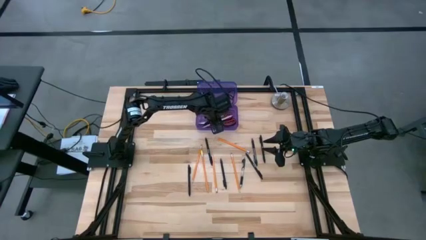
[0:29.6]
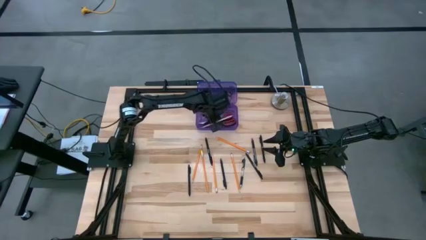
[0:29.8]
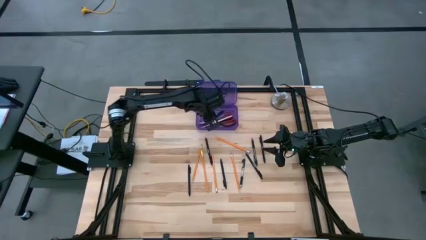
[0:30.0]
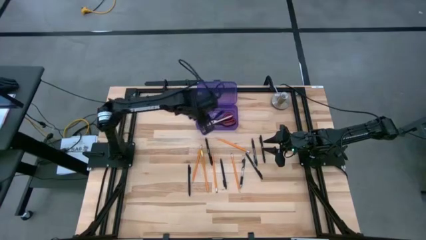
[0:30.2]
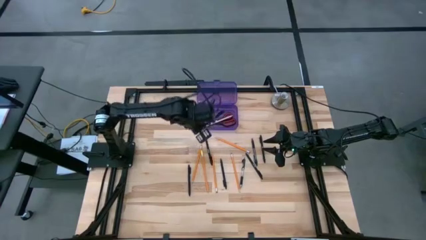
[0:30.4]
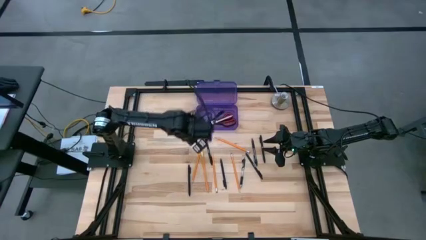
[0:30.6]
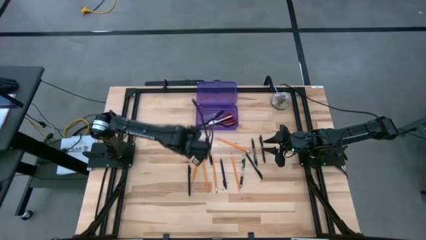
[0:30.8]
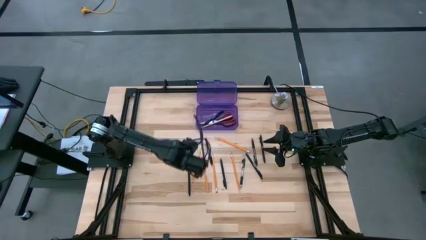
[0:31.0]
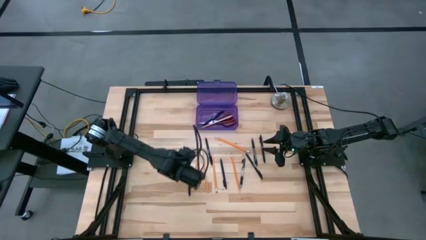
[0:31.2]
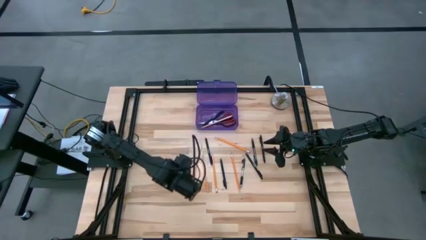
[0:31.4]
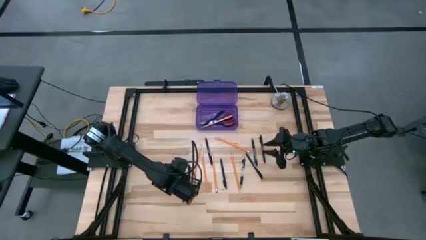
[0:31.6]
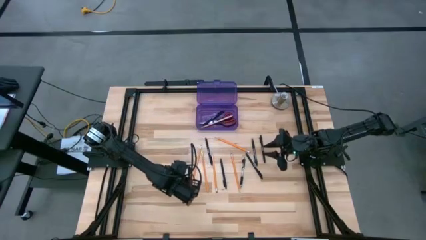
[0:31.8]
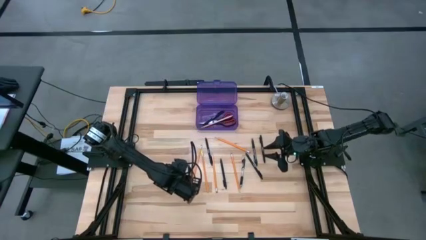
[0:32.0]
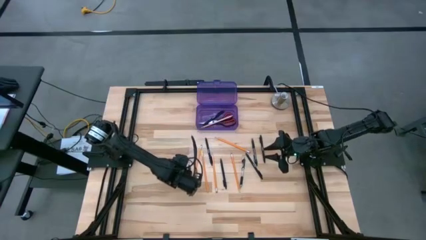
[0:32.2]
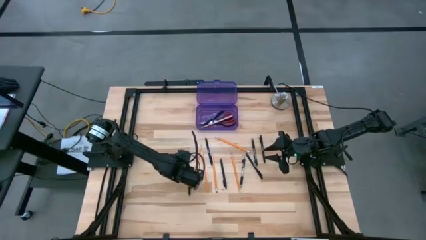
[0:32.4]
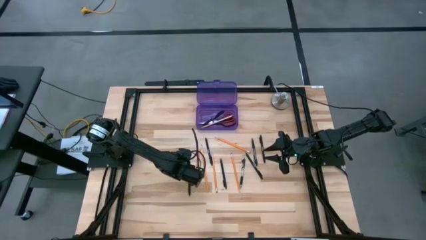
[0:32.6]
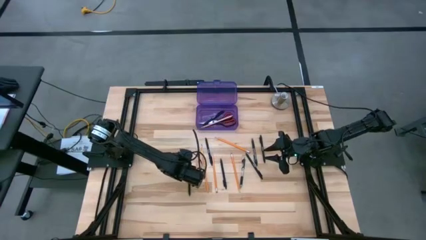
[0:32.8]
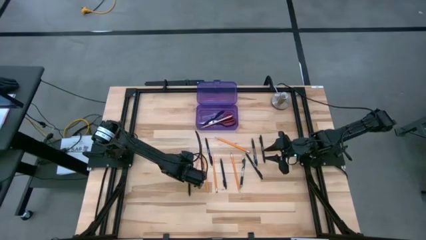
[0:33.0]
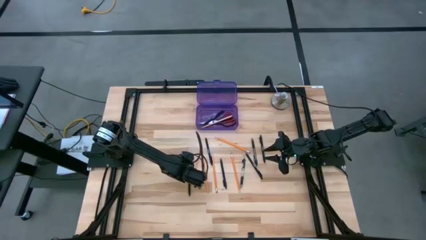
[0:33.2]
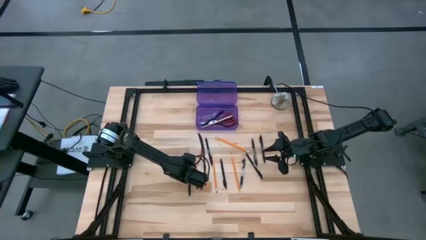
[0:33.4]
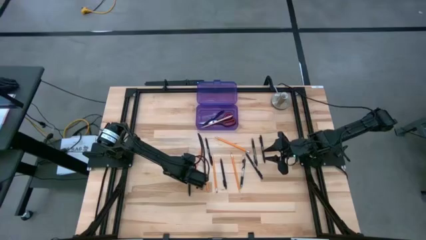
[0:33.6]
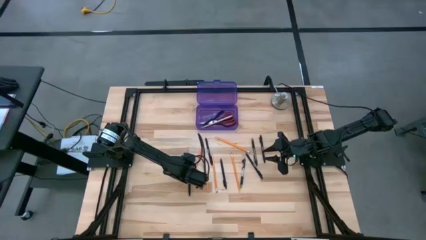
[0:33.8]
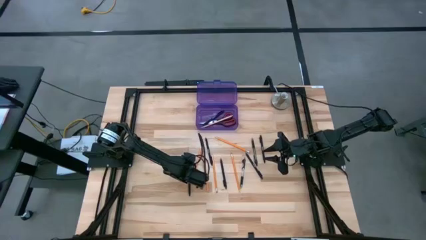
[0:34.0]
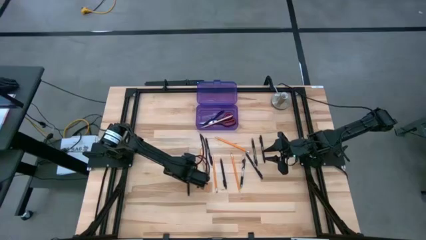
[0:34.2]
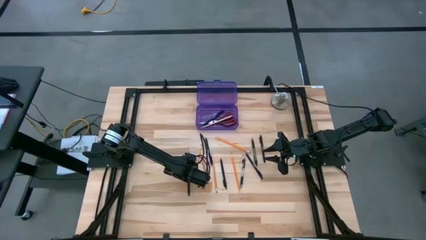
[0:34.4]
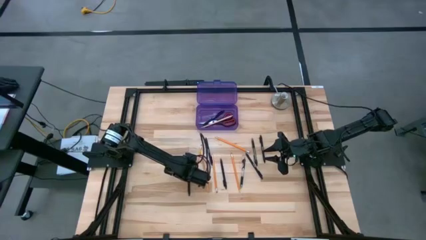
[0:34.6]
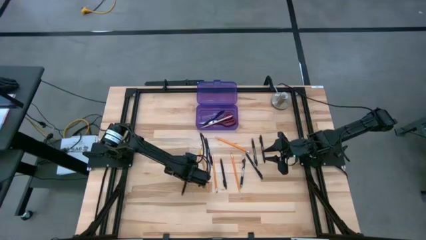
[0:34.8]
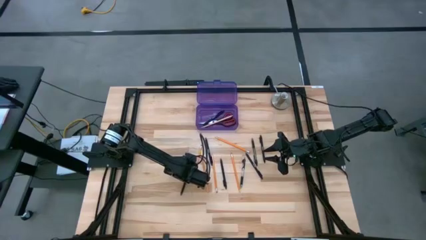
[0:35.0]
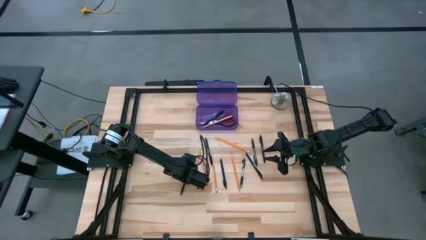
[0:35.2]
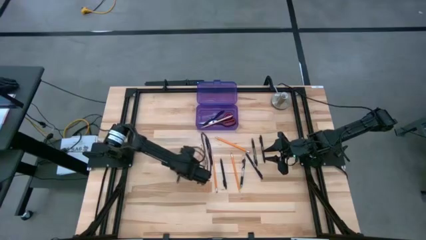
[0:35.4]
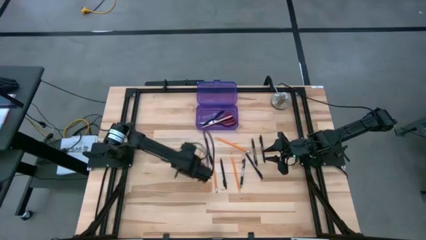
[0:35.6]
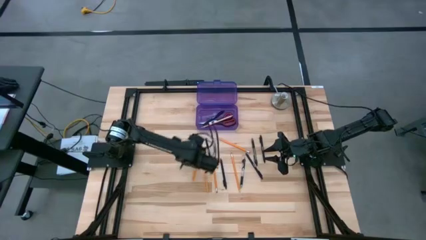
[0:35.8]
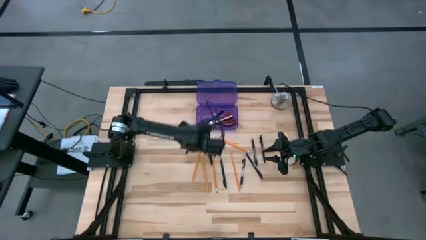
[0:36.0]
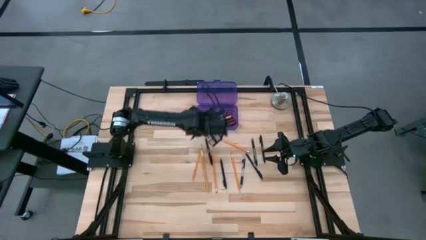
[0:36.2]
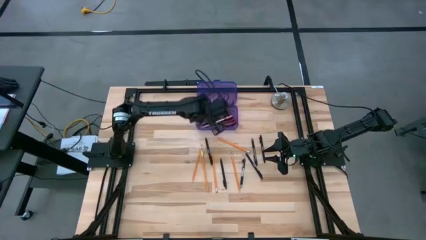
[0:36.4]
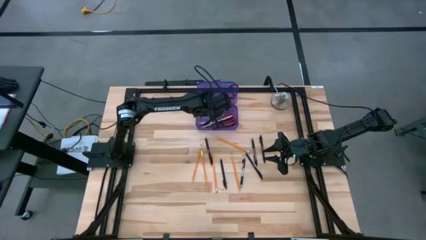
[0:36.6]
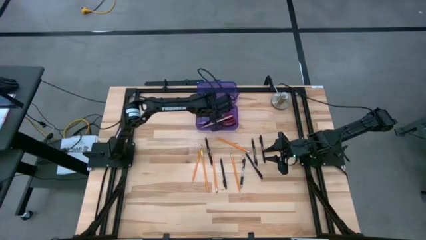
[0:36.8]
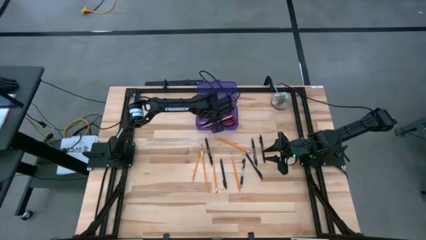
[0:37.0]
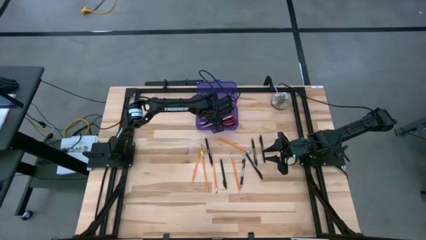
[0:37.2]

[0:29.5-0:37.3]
Task: Pick & place school supplies into a supply box
Put the black pen into the violet supply box

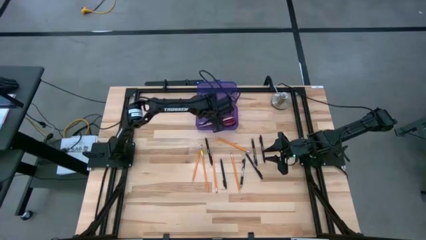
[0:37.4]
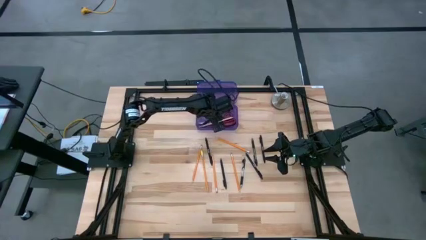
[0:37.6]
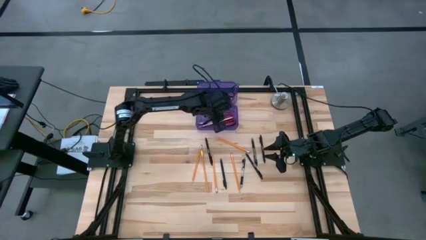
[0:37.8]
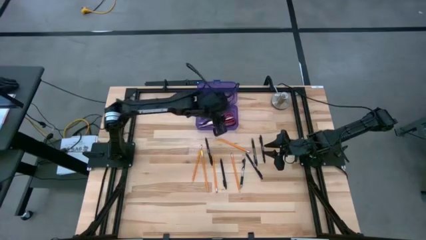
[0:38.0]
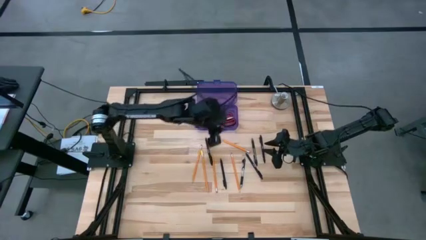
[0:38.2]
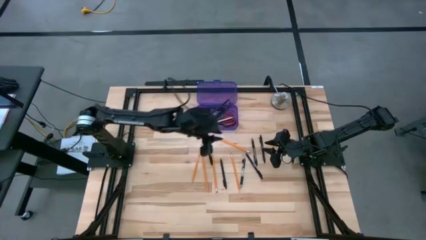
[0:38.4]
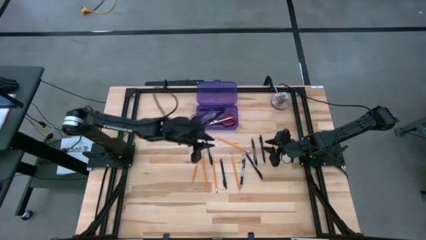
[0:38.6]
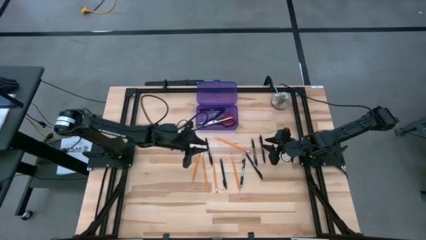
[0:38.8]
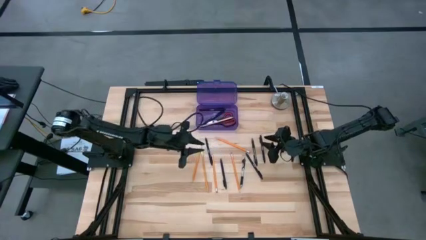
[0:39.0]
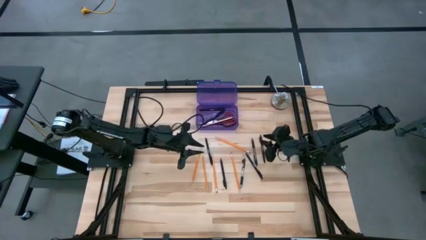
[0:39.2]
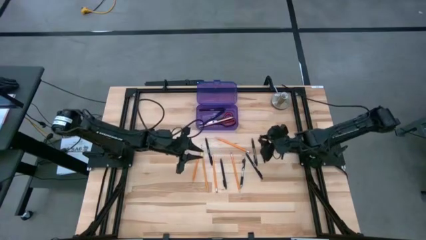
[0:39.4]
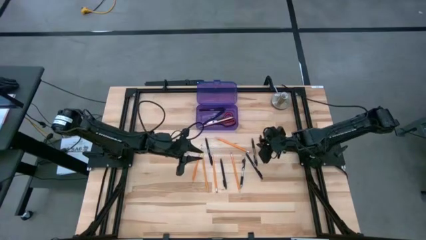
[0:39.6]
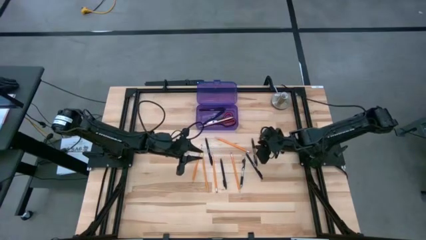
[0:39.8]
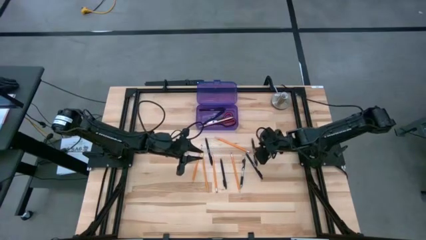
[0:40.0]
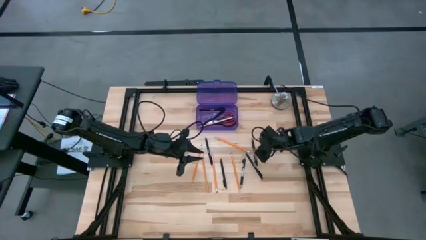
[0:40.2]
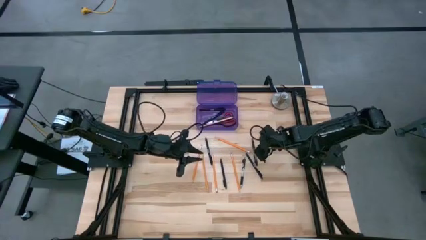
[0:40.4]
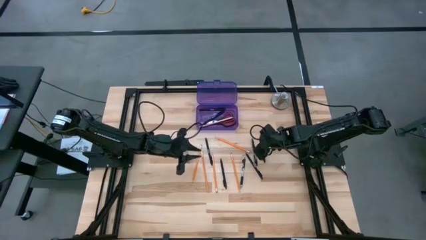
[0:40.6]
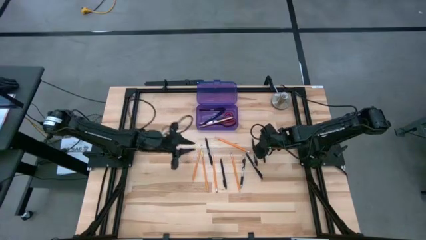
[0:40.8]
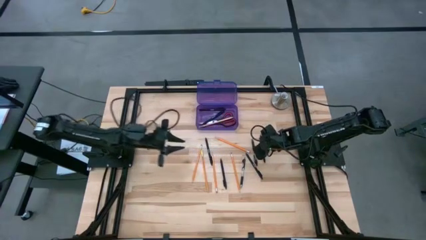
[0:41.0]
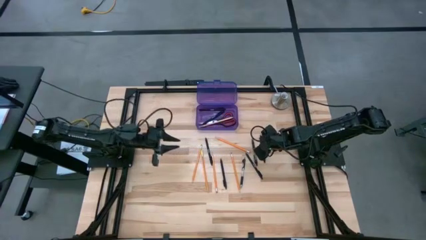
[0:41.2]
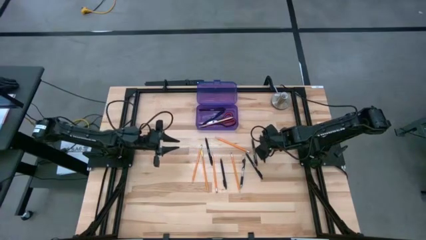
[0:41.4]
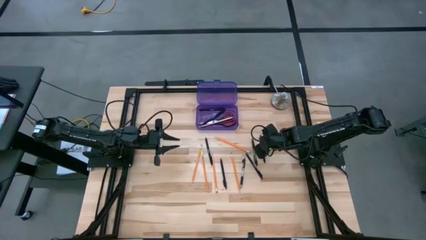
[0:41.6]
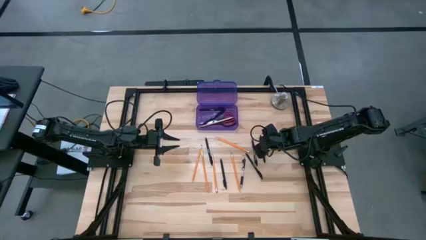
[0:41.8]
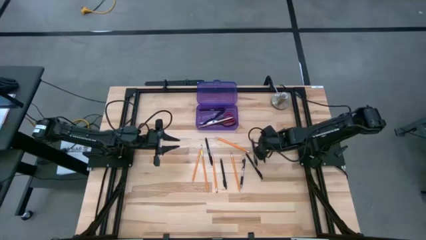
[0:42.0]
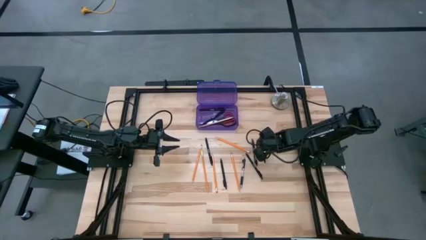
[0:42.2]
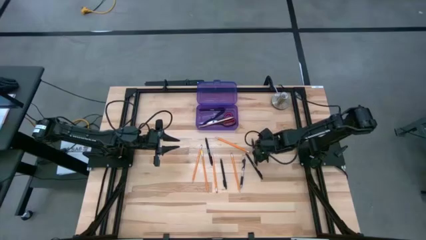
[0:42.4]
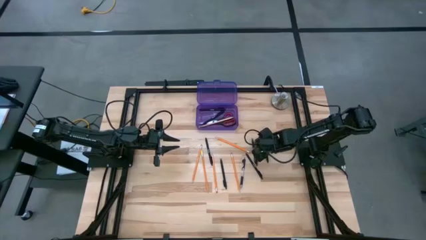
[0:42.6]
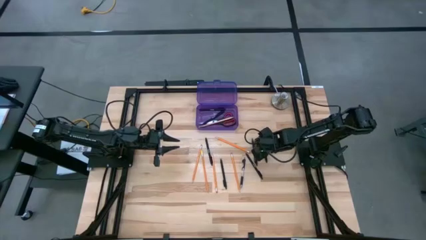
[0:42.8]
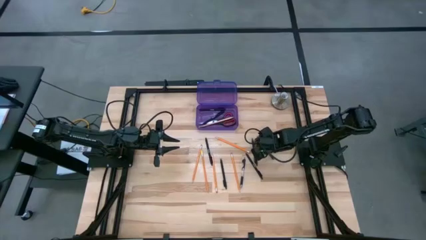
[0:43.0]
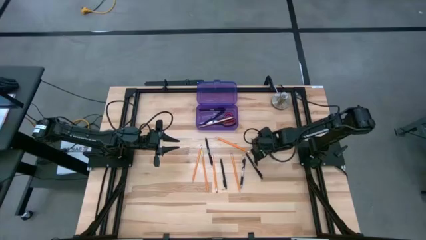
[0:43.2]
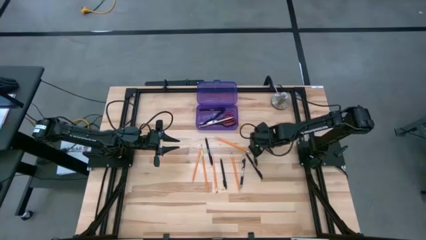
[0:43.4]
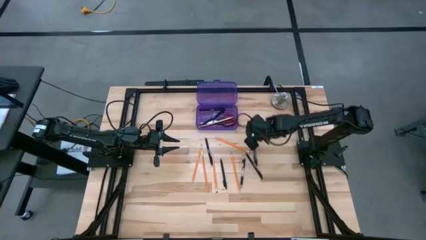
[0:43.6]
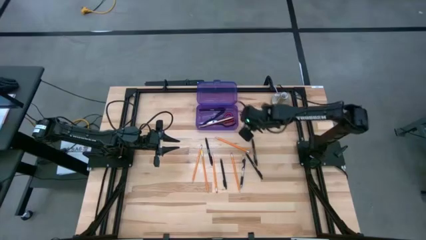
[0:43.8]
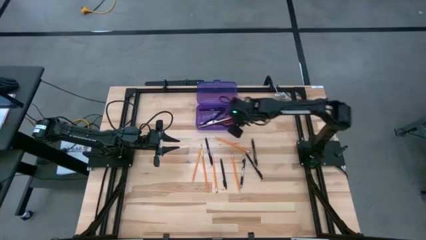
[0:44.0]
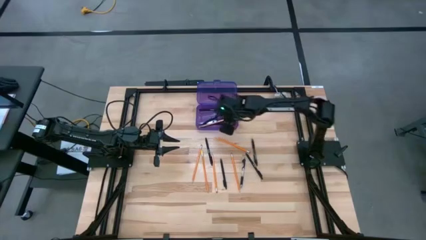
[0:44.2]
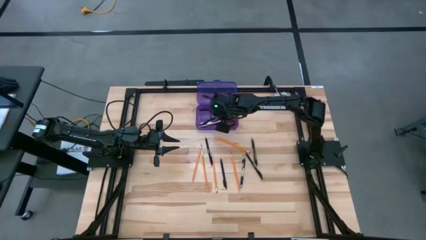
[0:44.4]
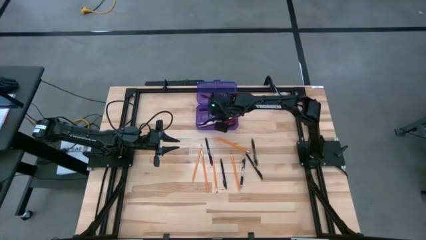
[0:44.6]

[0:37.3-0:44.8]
Put the black pen into the violet supply box

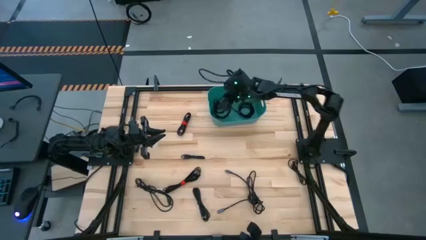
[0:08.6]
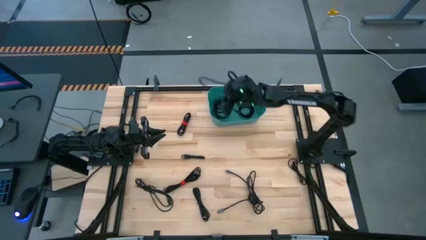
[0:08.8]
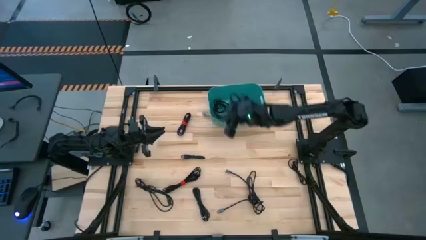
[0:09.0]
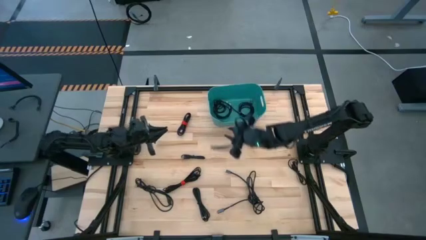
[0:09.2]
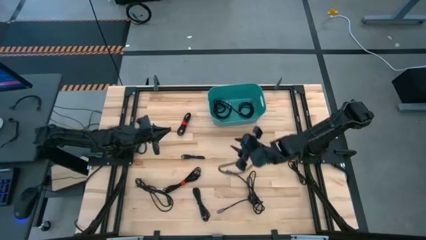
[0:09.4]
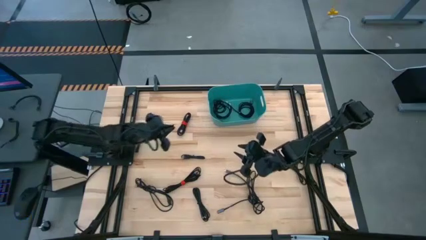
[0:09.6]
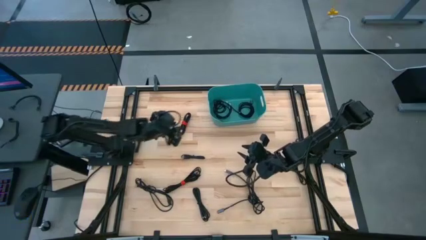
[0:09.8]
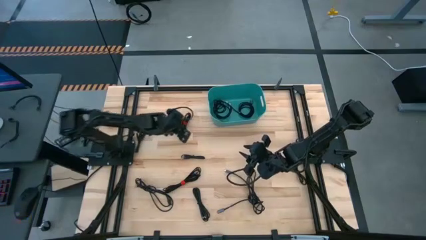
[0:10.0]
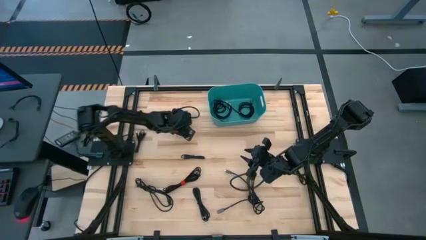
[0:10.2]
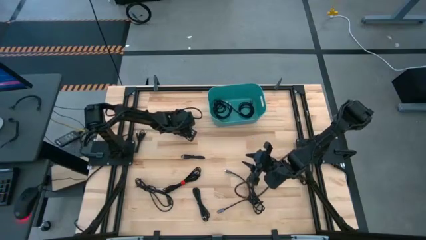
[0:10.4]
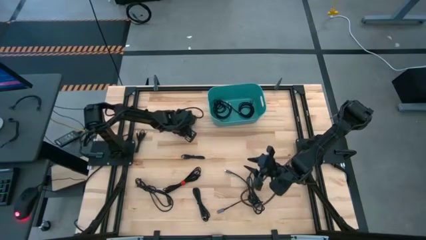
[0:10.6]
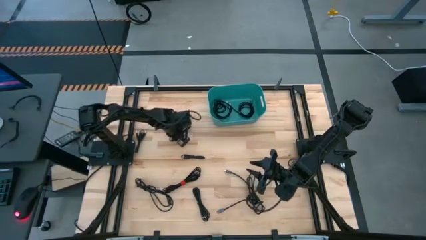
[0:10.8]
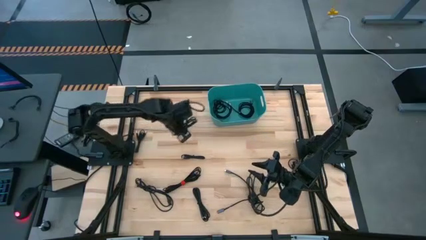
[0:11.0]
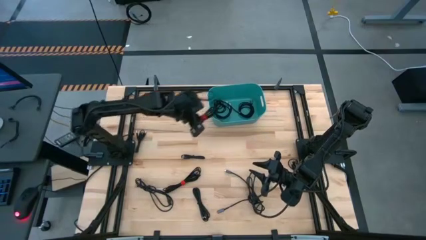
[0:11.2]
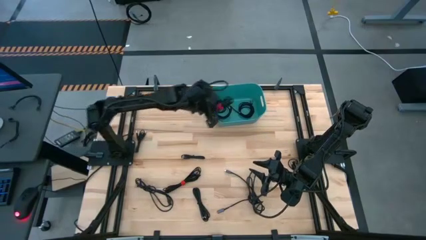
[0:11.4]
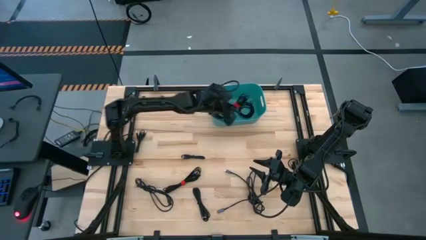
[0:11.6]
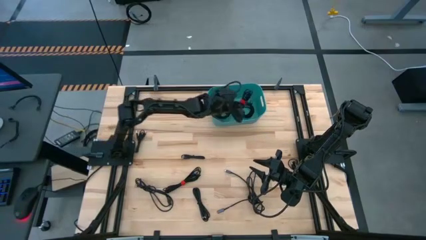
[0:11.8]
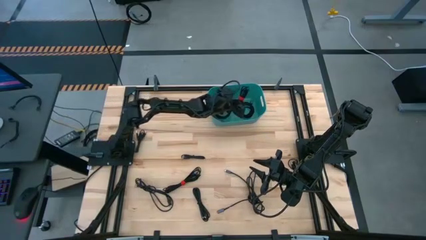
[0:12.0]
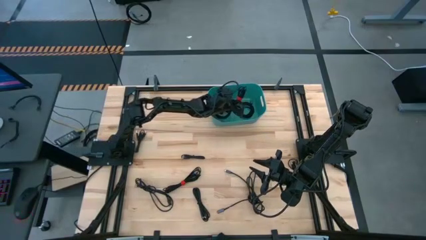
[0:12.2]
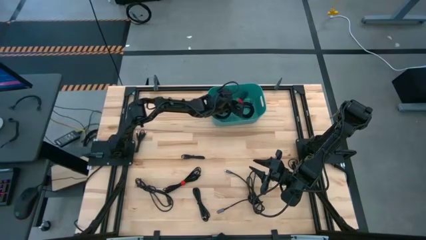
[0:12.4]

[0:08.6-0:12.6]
Task: Pick and place USB-C Cables
Put the black charger cable into the blue bin
